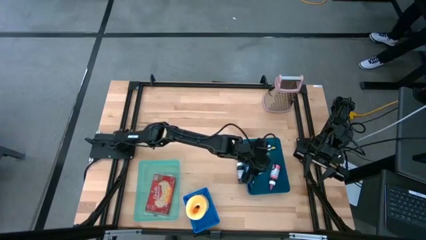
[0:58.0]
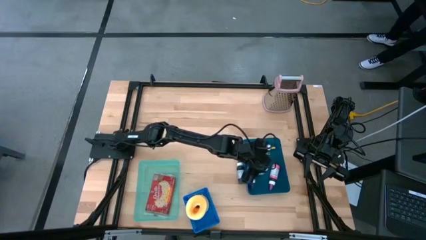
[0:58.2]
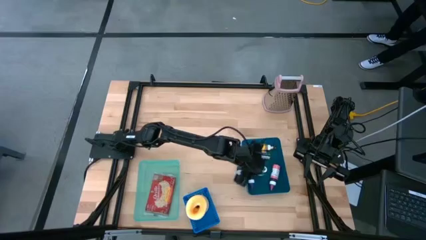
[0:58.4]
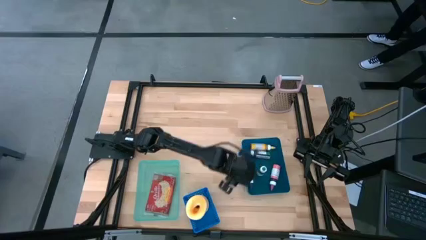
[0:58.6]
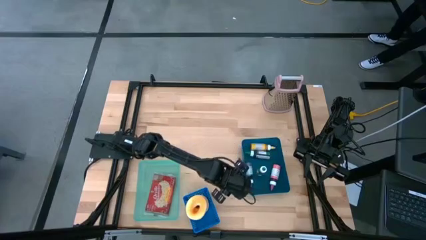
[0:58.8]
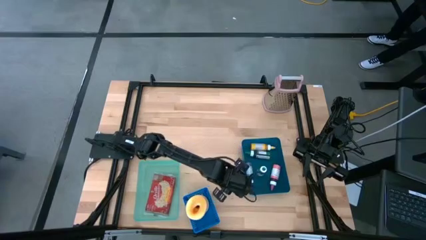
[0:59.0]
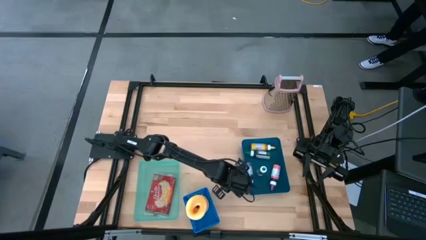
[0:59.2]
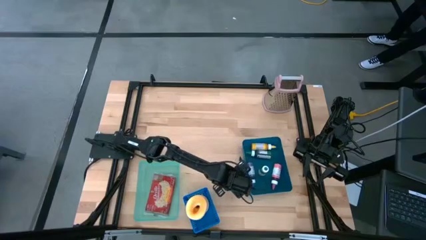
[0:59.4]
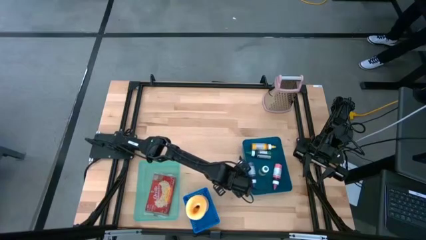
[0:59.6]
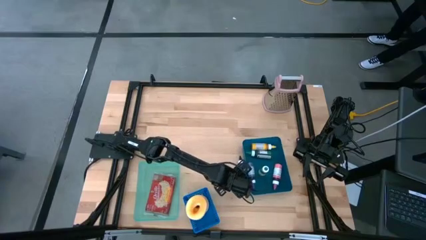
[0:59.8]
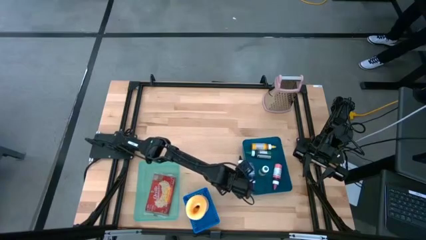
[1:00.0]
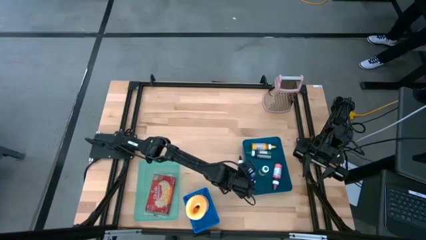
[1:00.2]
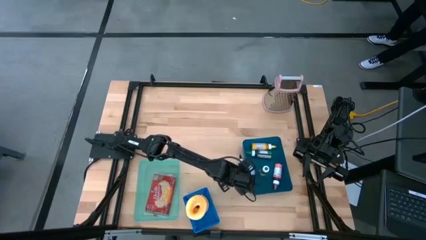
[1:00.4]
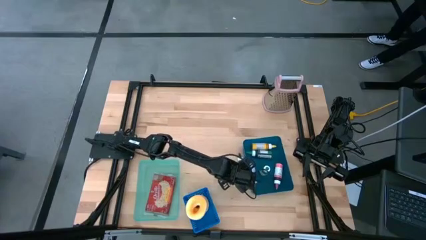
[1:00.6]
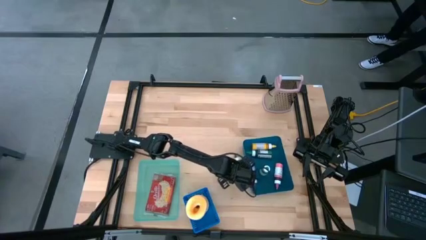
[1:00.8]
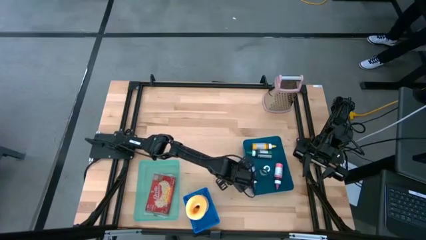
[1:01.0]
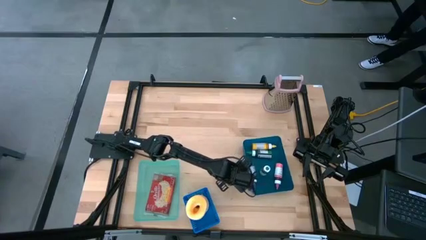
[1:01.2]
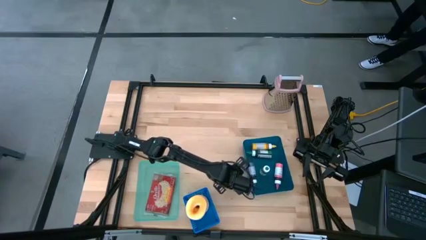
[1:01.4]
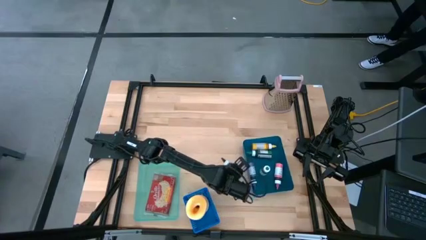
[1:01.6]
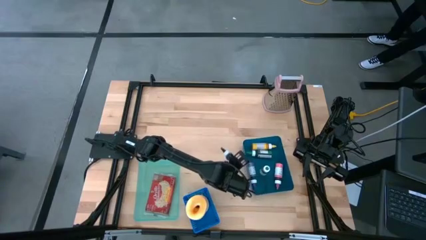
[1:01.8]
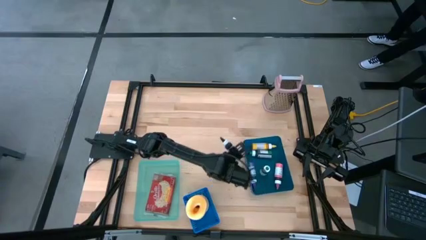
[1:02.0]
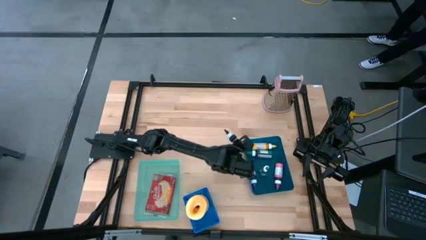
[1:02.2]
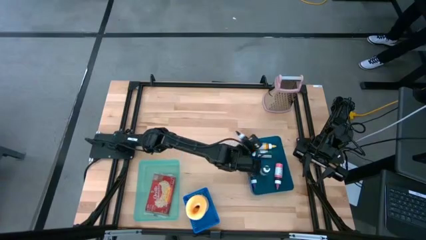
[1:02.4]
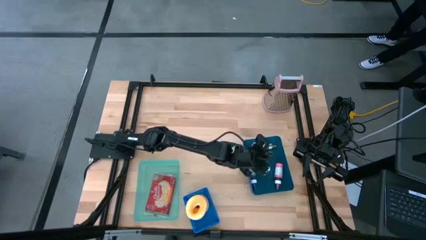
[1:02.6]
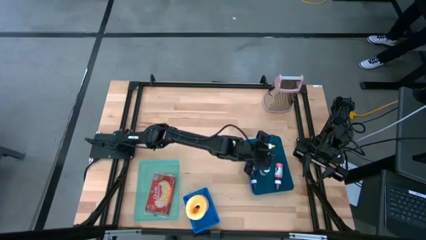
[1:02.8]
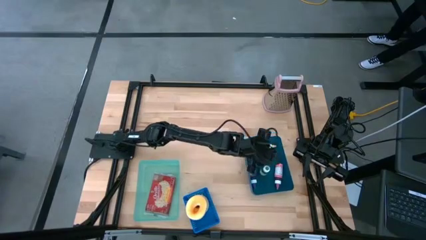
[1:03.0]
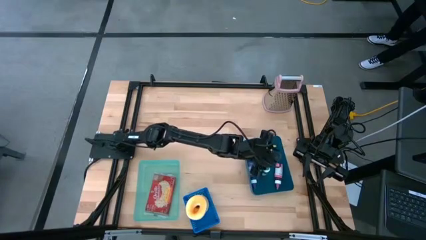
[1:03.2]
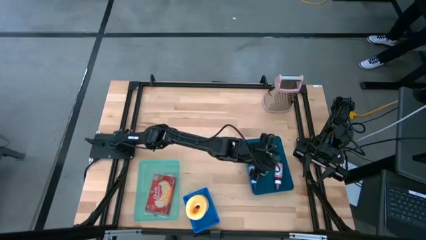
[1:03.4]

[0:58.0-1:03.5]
Put the black food coloring bottle into the dark blue bin

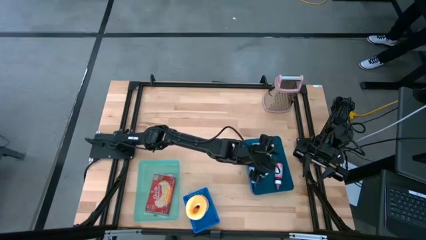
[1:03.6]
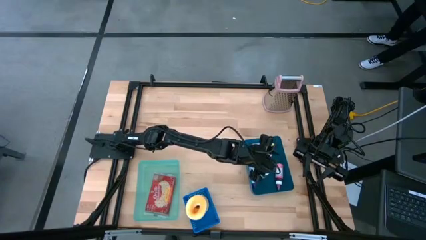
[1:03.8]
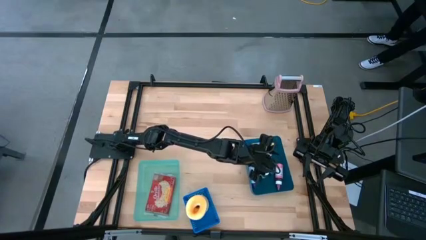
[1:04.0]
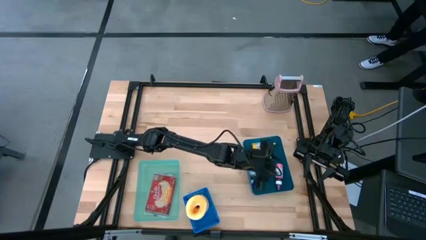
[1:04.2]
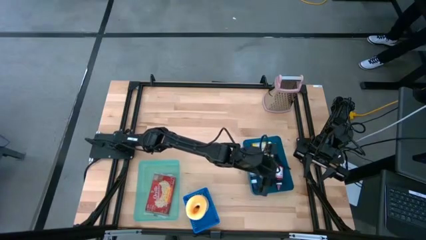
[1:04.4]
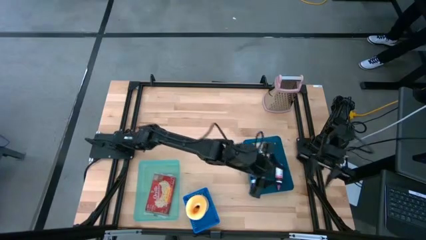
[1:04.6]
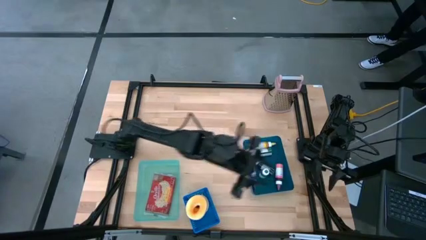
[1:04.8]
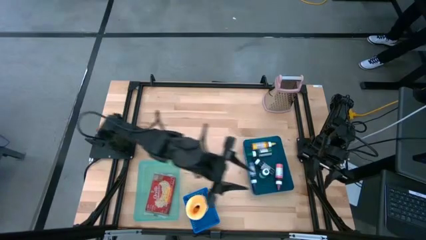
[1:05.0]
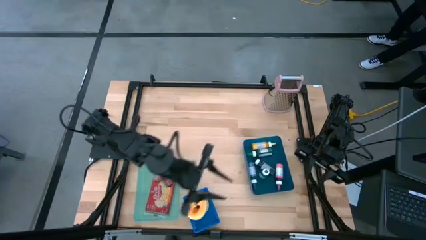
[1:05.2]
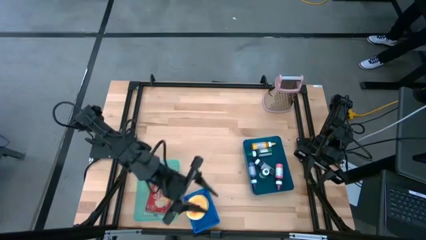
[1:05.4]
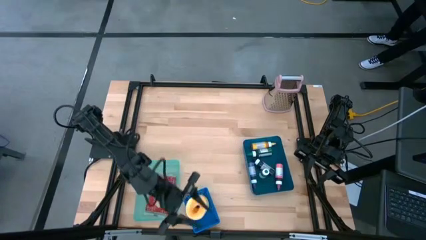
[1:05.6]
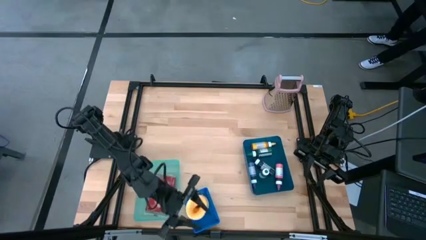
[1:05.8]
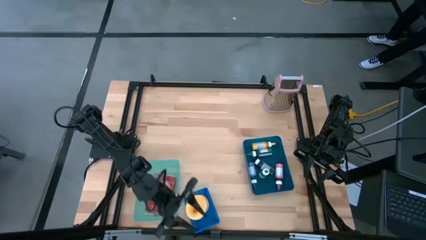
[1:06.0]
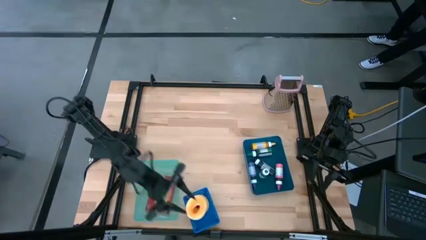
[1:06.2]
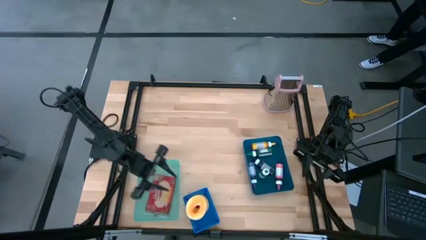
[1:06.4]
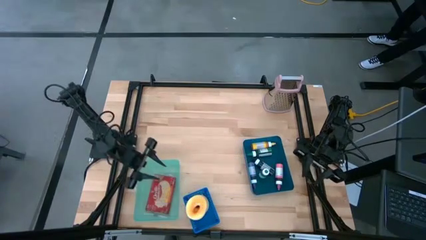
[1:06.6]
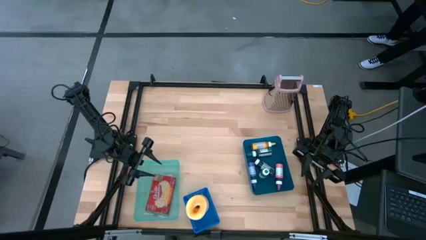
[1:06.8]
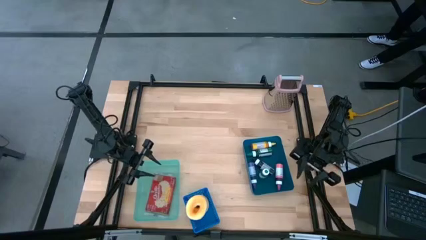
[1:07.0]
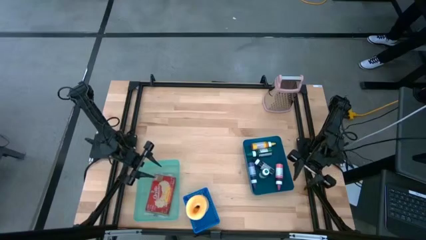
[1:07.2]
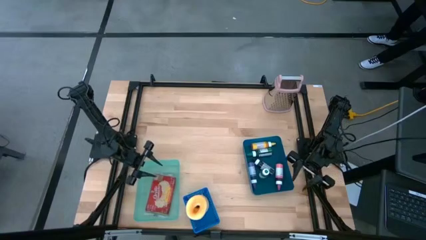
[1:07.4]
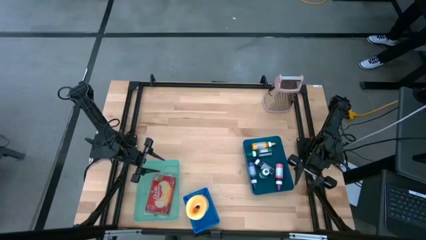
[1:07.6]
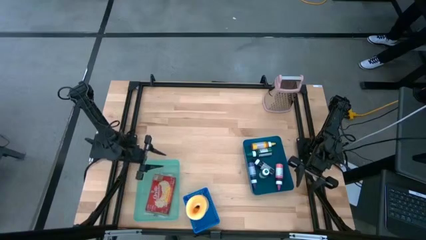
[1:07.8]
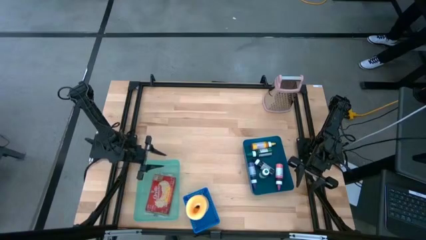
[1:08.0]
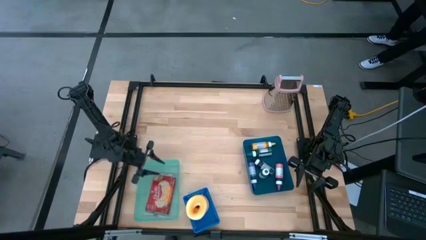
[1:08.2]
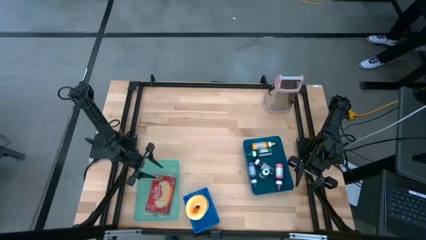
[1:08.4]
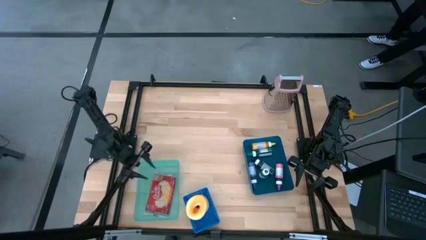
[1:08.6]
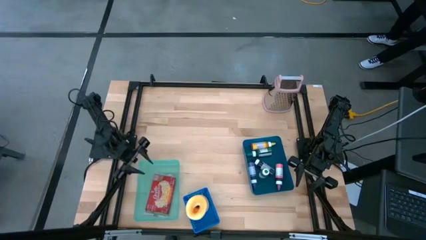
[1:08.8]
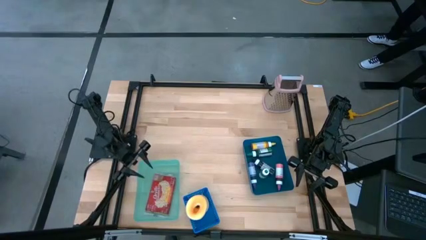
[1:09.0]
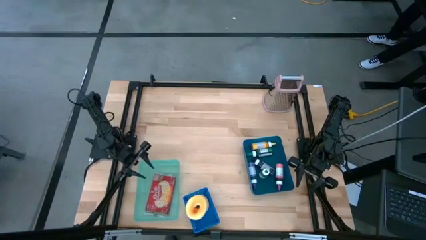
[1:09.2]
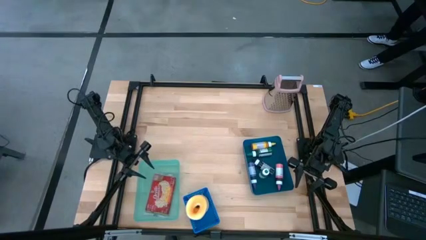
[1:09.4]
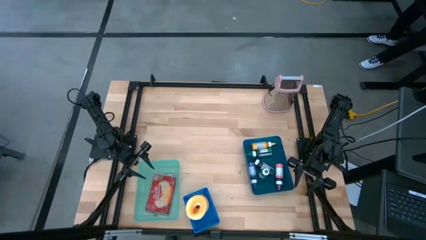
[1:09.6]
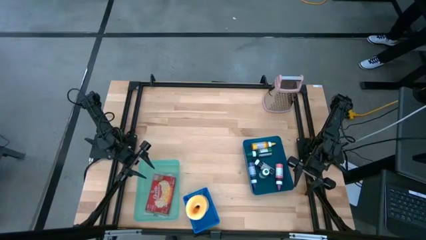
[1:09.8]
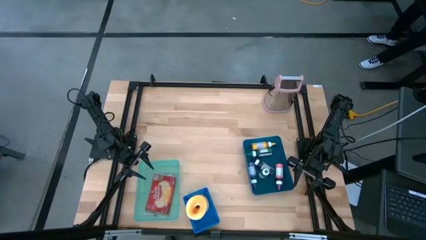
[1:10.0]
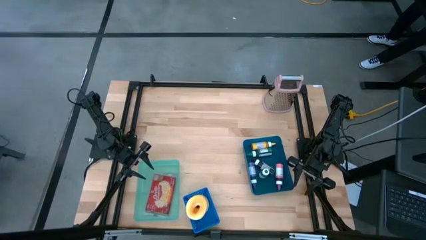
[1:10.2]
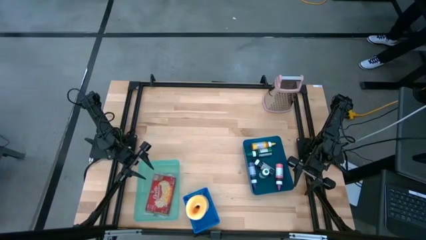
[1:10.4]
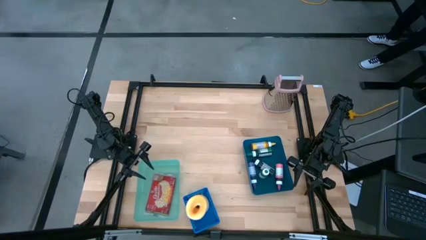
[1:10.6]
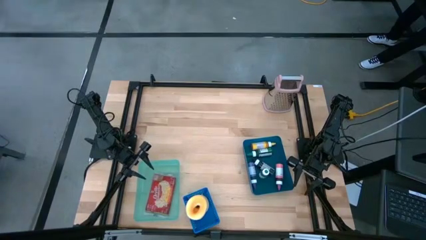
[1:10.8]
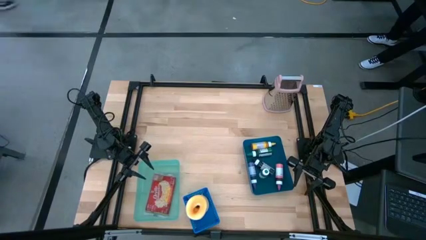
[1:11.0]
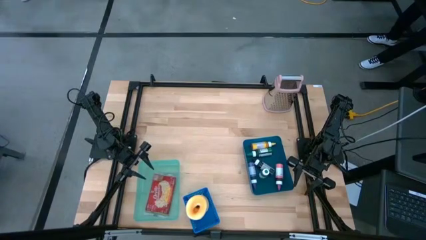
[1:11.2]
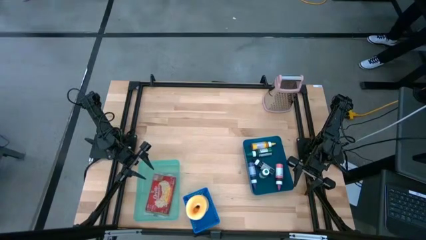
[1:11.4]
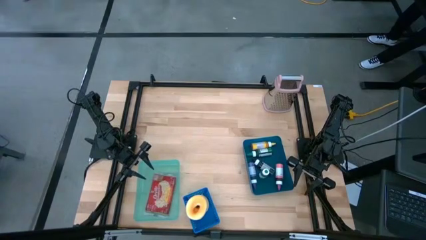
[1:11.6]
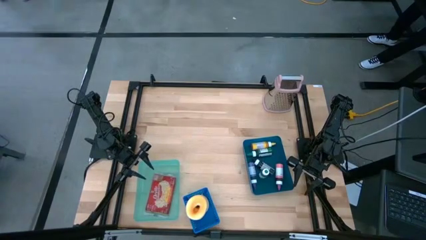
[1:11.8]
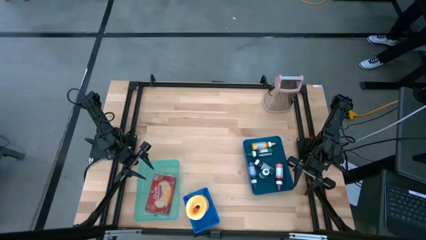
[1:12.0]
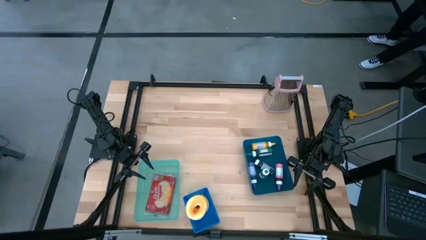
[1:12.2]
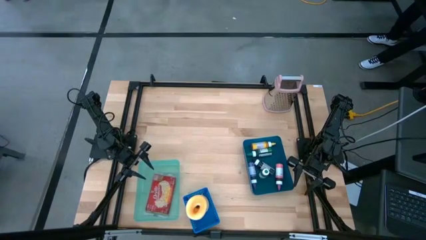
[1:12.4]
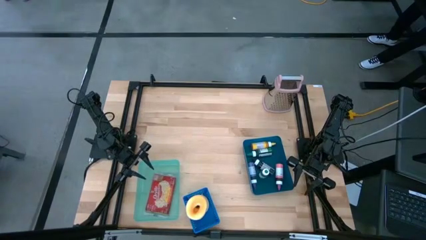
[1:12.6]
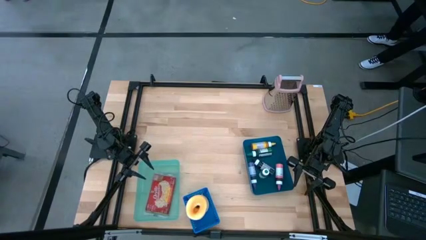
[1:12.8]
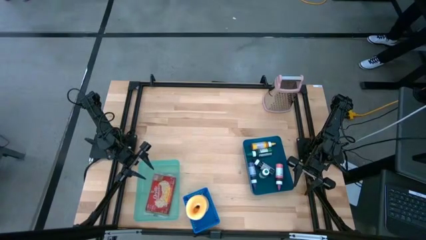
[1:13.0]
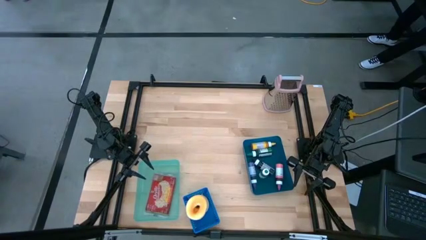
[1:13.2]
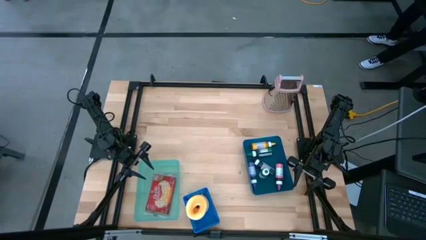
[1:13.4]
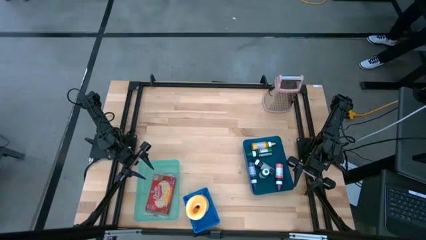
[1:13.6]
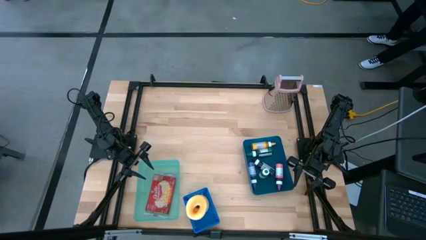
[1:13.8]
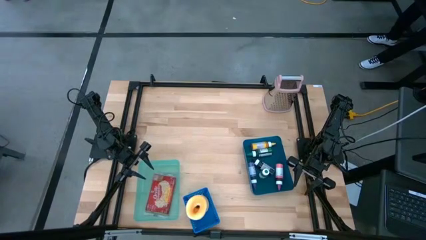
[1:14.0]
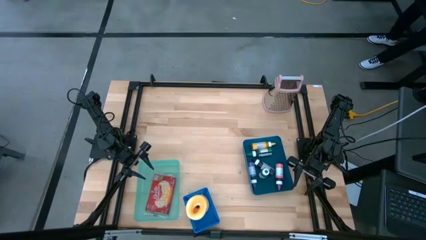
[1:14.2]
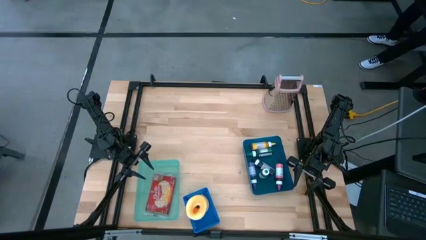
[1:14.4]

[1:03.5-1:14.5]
Return to Home Position
